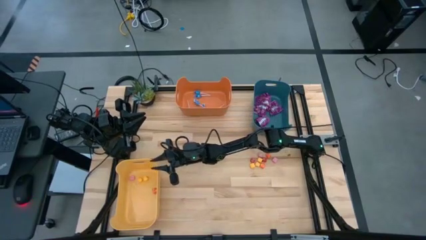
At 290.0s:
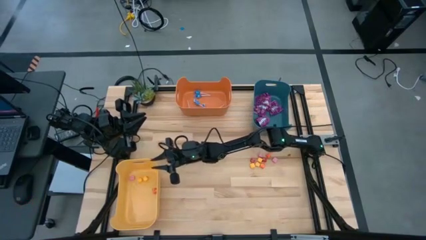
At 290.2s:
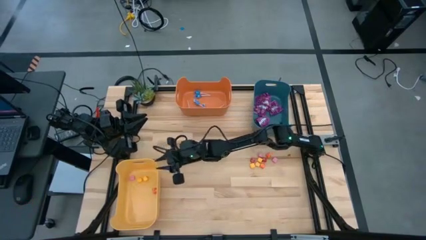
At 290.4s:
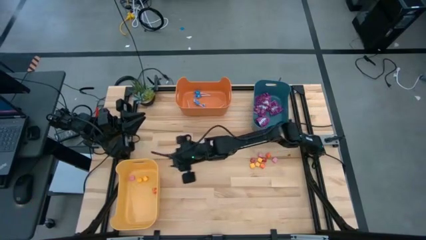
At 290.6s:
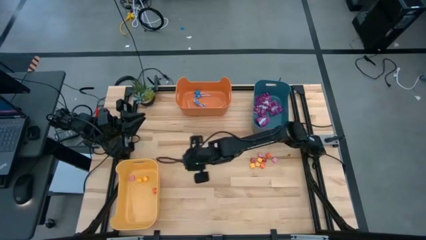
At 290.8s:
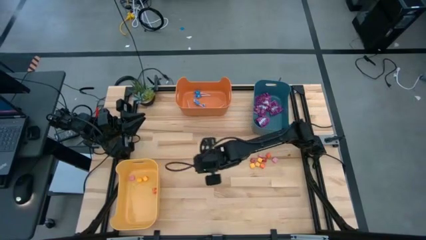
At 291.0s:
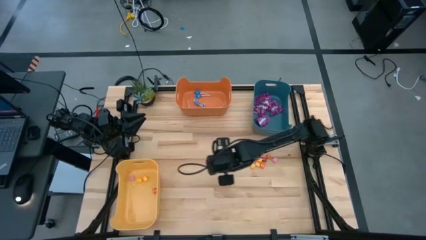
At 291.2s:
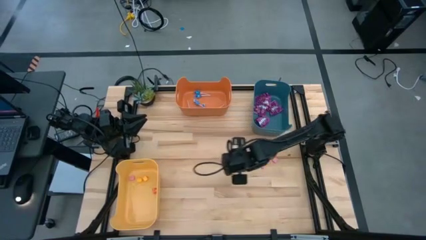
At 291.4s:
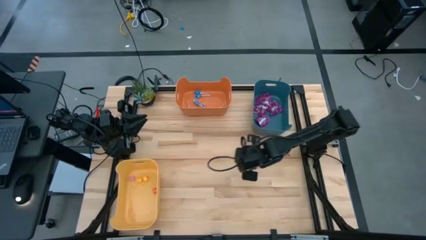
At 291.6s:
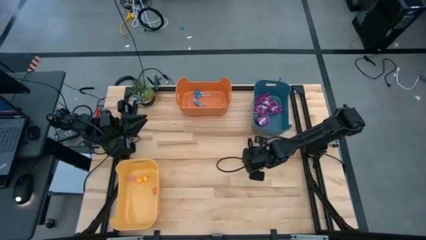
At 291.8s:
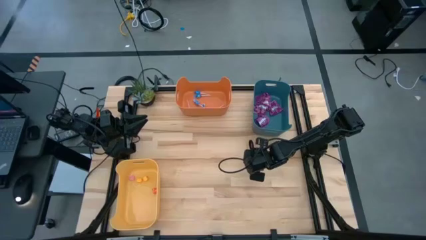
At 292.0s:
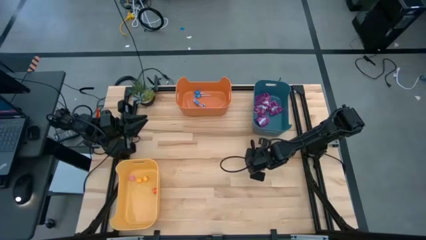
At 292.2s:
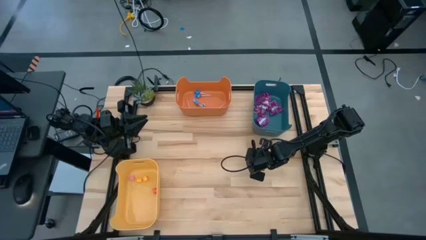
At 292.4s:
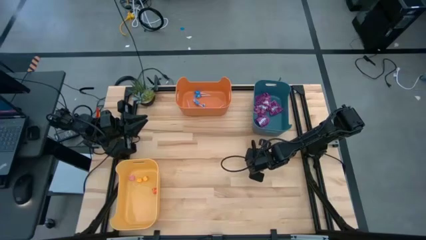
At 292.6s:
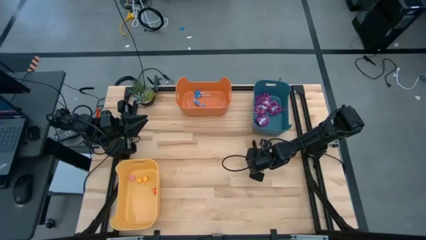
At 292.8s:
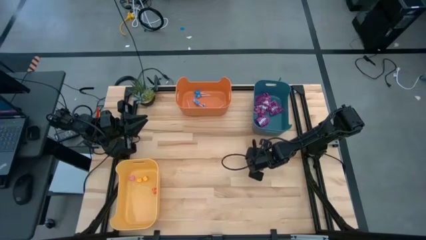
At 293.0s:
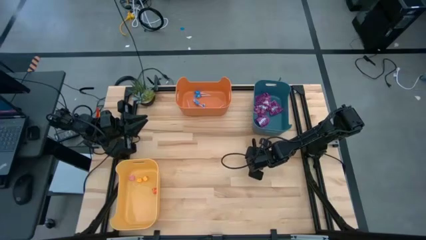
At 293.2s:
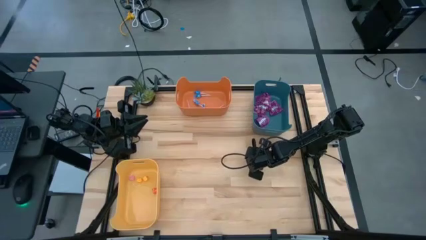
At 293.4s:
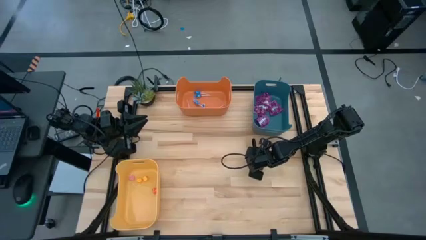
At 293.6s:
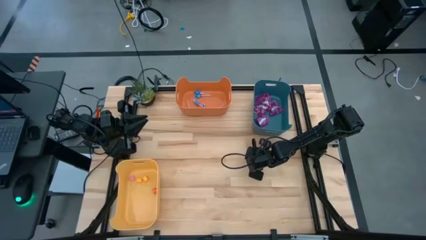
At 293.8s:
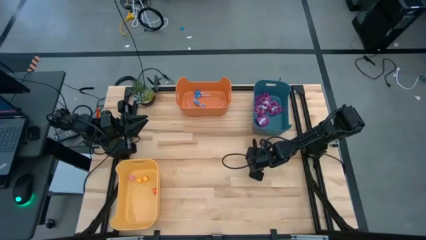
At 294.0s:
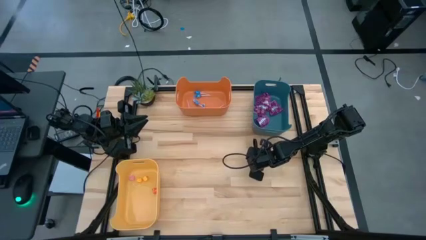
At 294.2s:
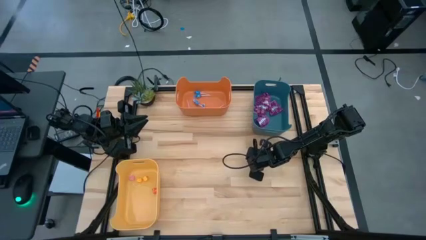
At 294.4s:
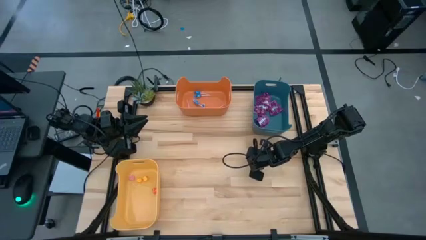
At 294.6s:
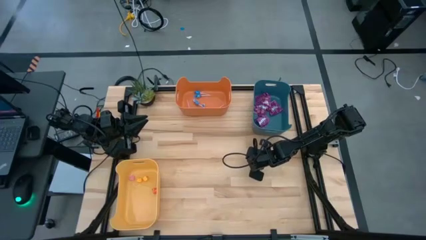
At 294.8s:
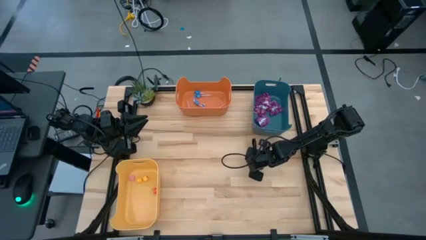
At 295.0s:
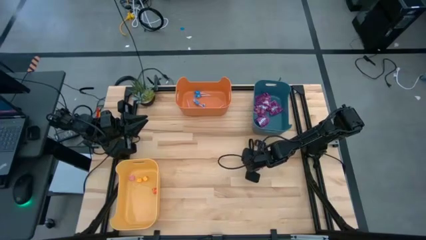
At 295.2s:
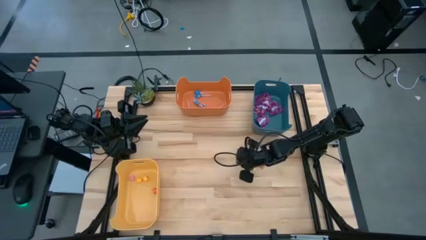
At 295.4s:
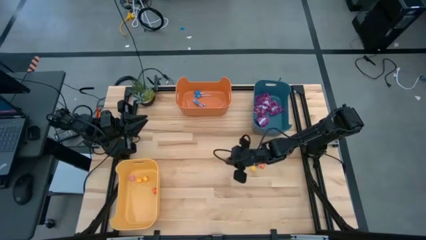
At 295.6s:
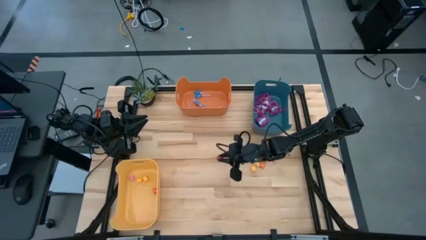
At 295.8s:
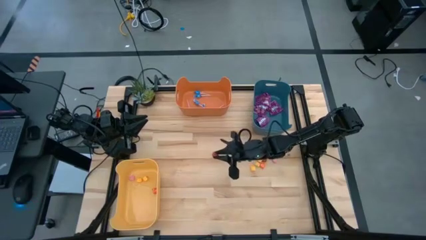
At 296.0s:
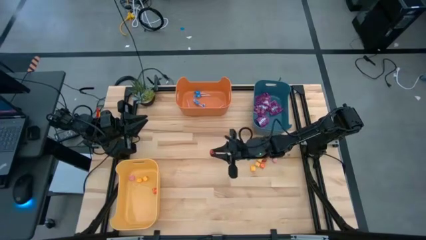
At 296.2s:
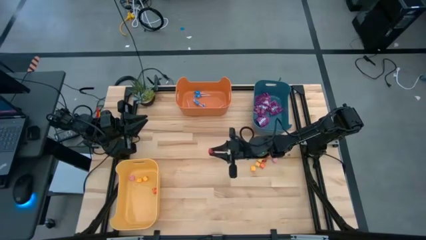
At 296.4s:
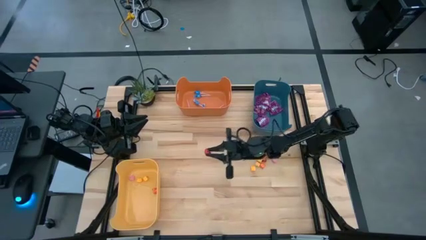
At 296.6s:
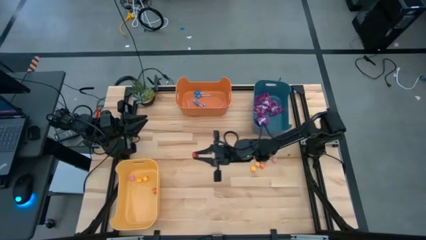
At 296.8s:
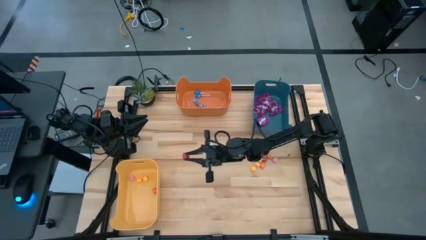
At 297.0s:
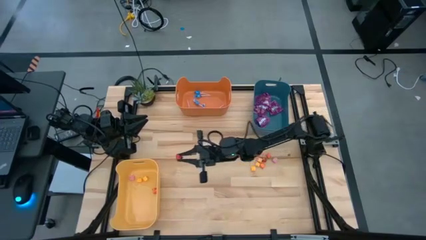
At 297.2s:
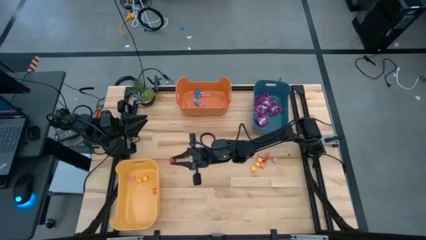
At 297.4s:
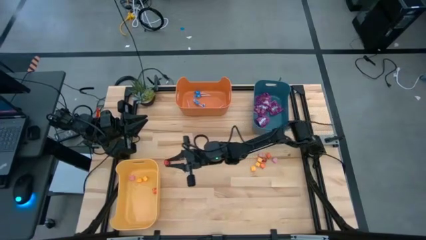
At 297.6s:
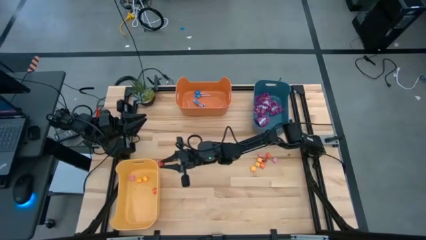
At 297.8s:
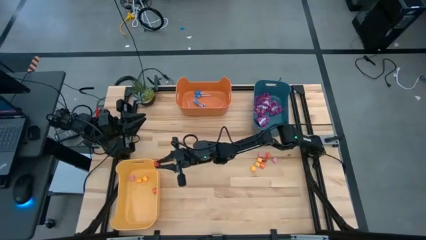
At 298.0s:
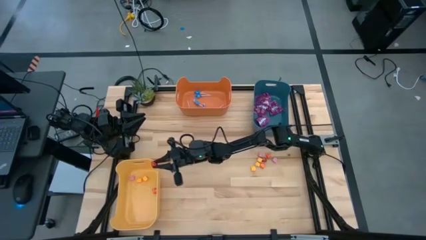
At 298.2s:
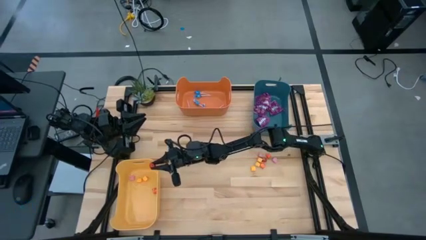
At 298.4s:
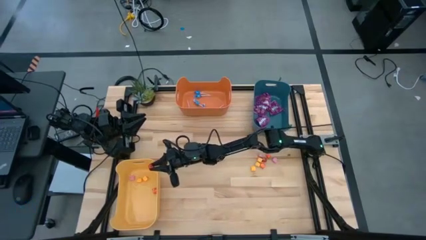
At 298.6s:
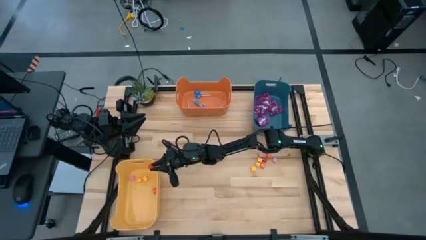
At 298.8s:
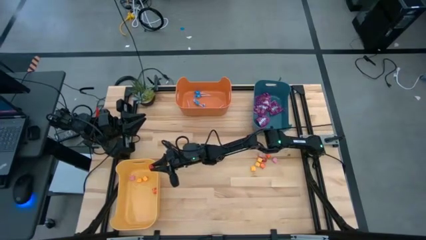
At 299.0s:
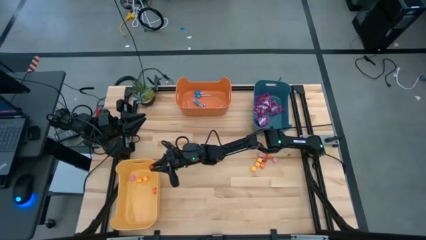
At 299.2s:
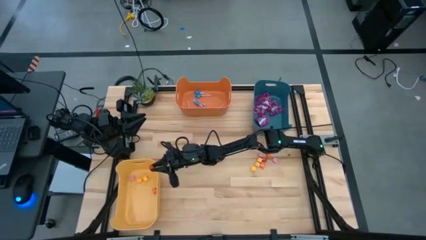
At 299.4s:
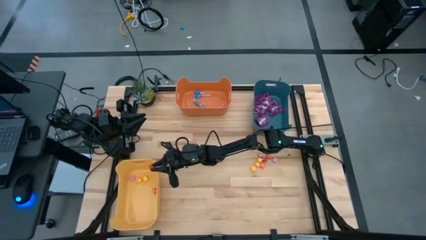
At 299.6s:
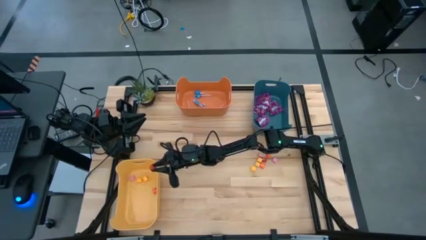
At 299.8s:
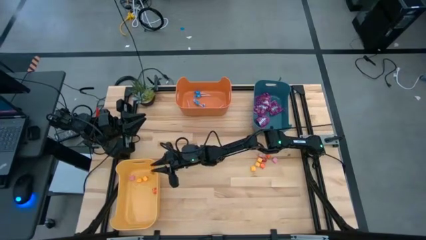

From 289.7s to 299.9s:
Task: Sort candy
Put the left red candy into the yellow bin

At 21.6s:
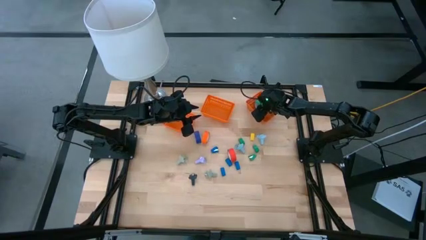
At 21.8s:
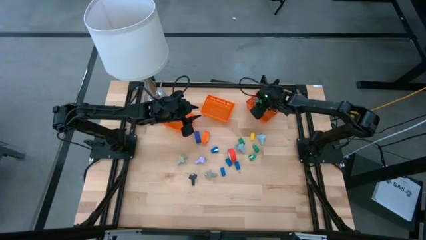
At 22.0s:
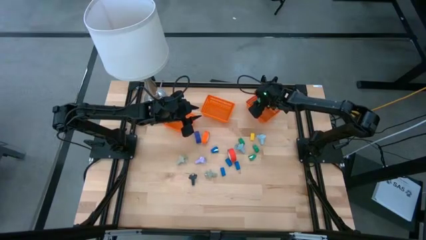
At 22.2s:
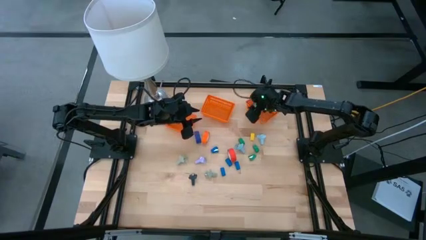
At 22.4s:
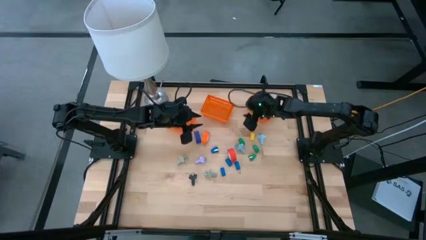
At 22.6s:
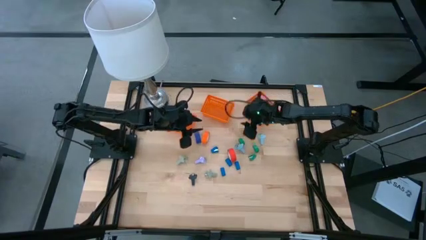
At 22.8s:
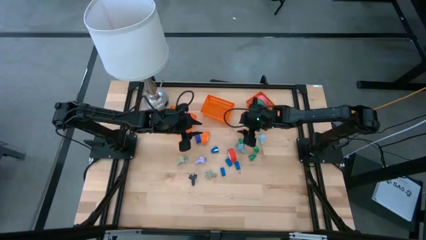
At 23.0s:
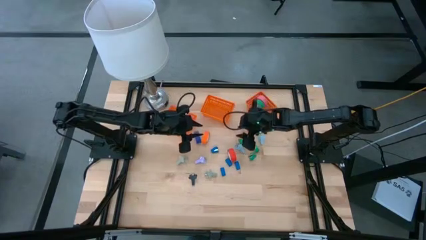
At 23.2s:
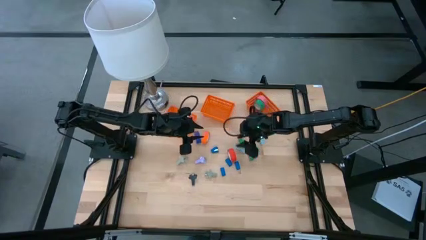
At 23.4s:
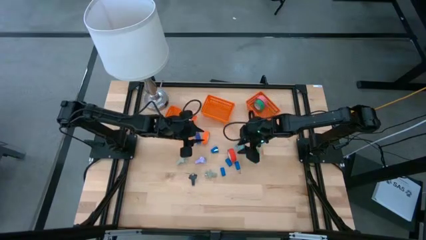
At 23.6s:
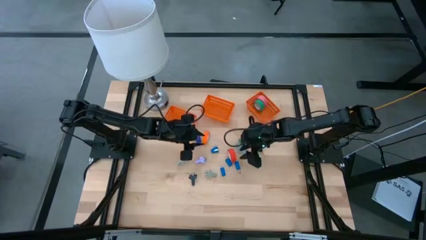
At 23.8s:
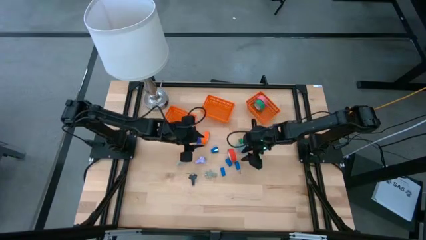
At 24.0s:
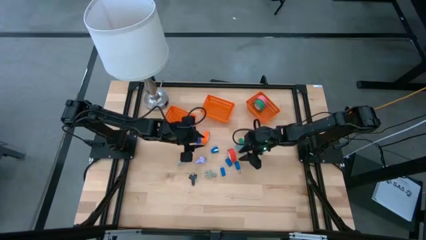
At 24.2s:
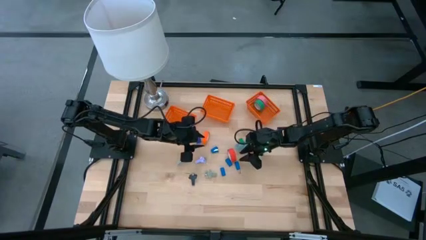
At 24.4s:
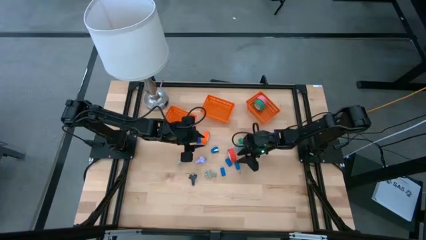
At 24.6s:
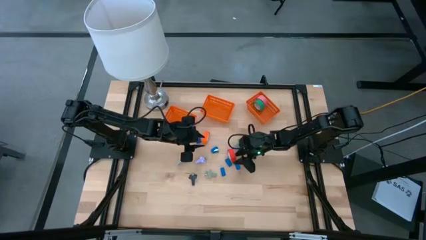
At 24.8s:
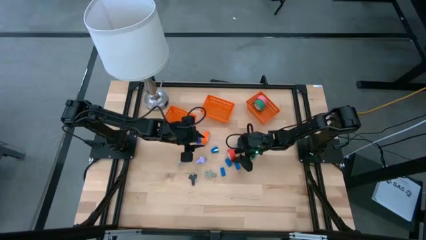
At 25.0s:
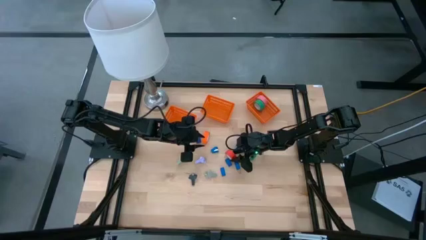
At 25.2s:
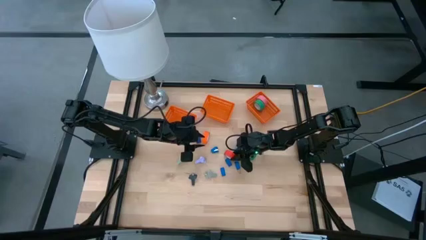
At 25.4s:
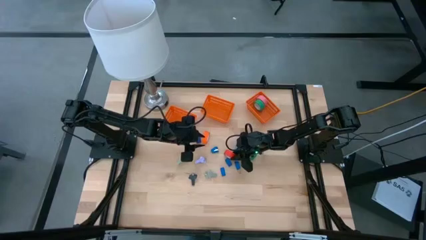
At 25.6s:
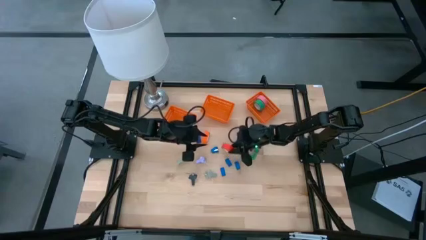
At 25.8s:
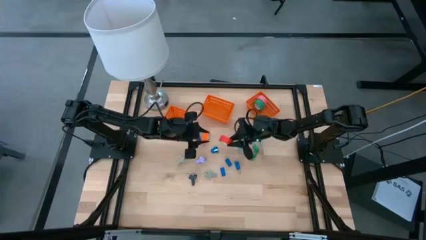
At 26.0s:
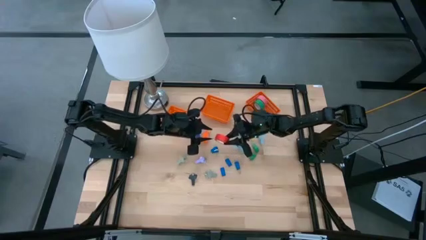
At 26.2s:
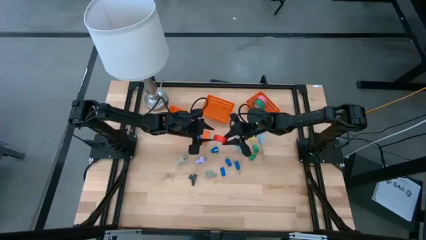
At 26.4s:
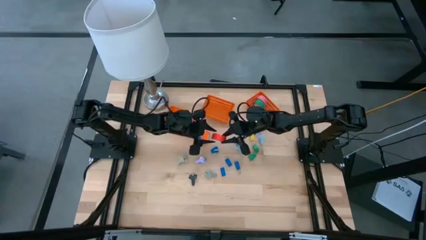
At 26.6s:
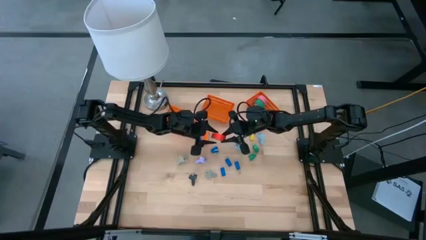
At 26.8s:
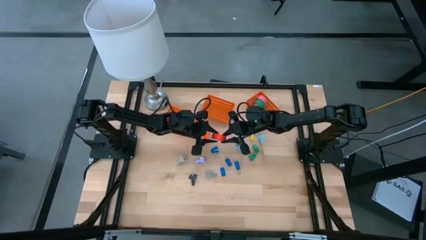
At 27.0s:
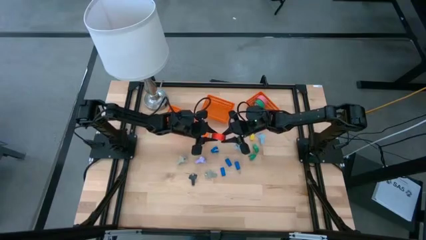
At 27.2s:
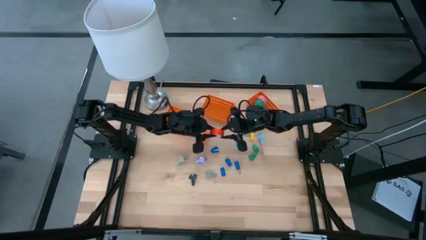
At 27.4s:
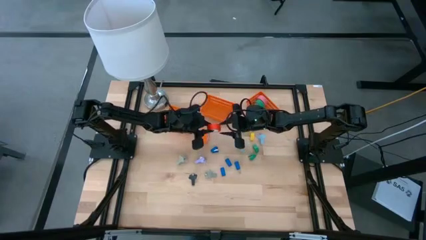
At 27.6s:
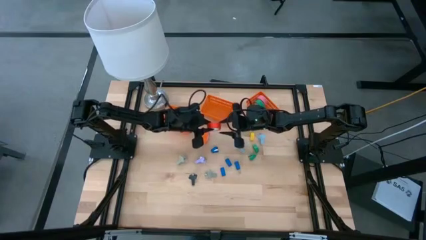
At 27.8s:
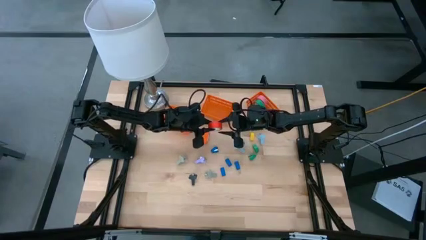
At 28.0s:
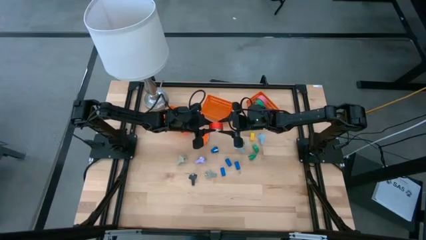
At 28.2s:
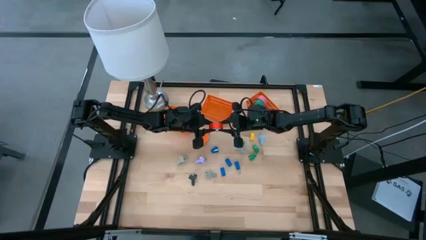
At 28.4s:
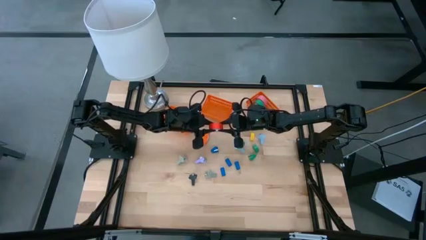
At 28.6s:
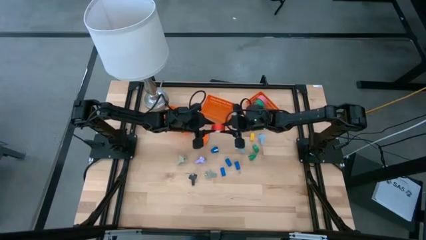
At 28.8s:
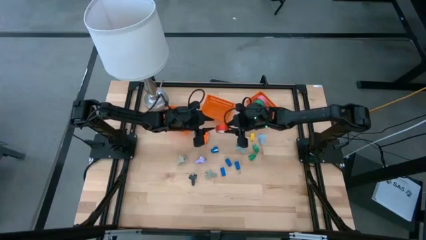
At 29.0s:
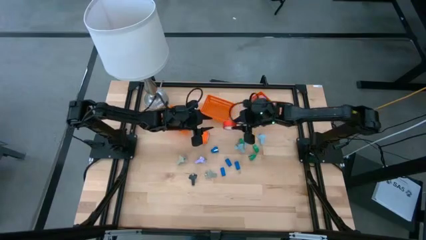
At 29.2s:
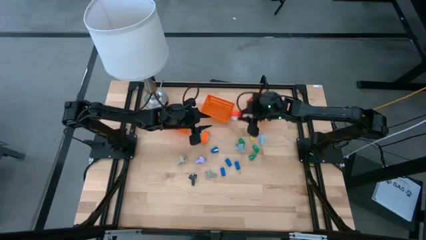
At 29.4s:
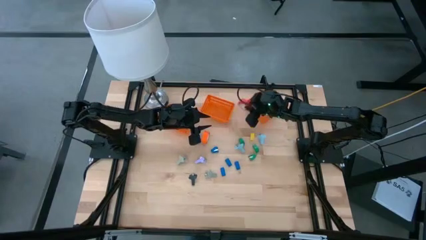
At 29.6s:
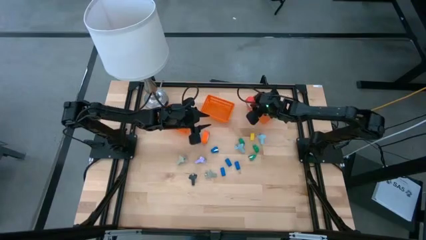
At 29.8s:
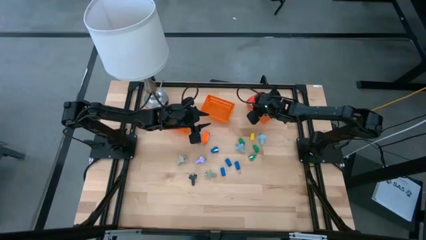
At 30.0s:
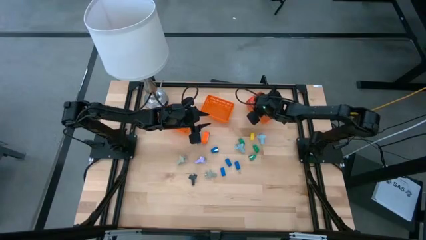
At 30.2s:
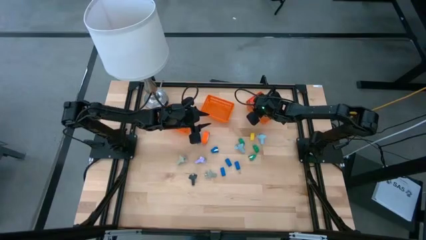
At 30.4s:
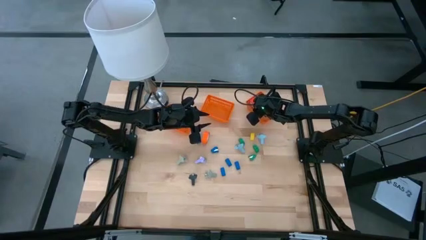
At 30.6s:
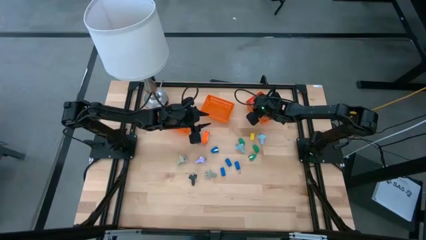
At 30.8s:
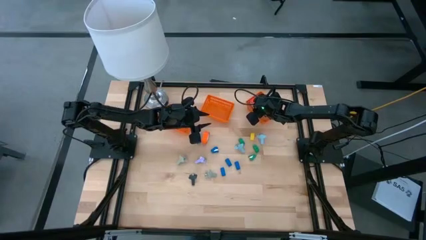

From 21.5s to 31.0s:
Task: Pick and place Stapler, Stapler remover, tape
Put the red tape into the right orange bin
